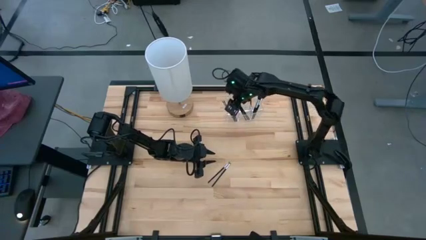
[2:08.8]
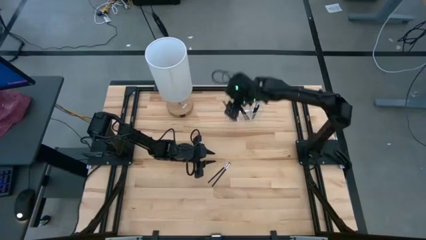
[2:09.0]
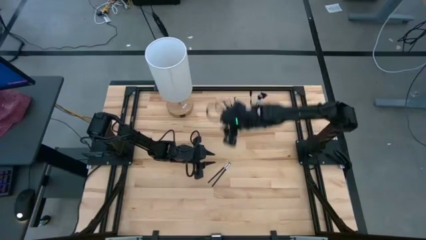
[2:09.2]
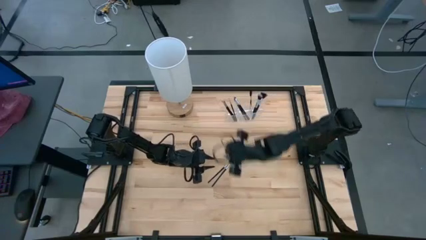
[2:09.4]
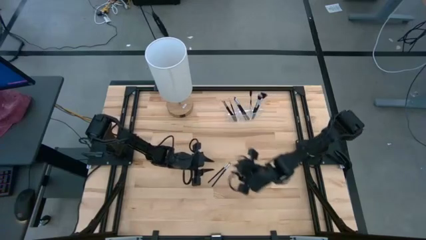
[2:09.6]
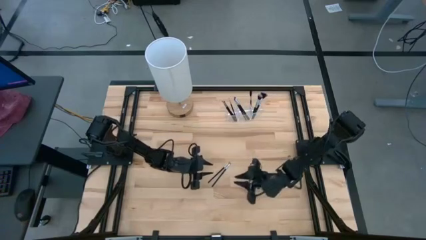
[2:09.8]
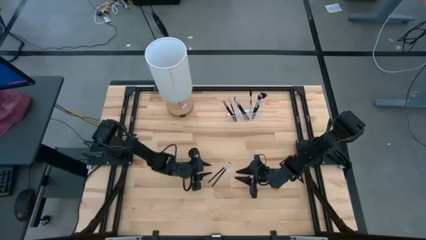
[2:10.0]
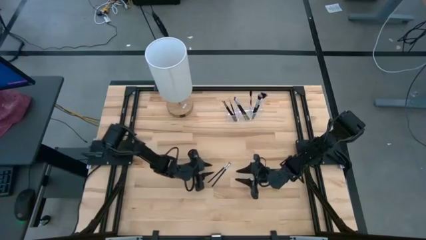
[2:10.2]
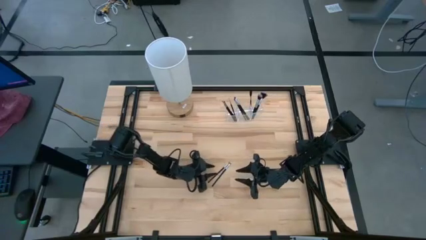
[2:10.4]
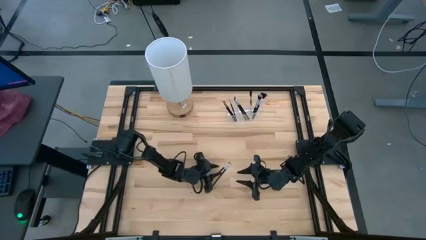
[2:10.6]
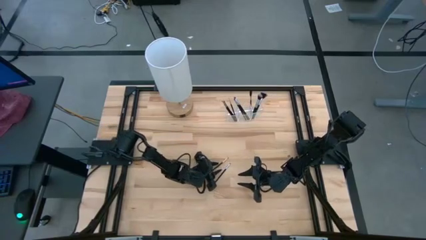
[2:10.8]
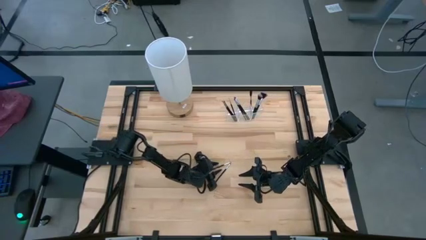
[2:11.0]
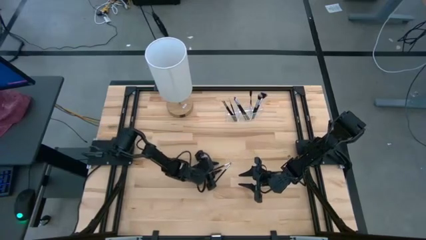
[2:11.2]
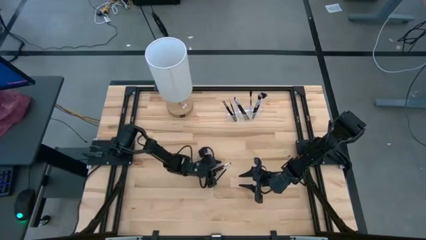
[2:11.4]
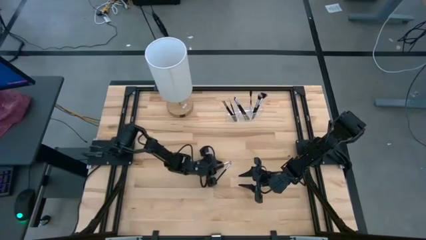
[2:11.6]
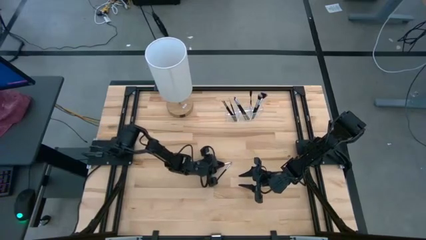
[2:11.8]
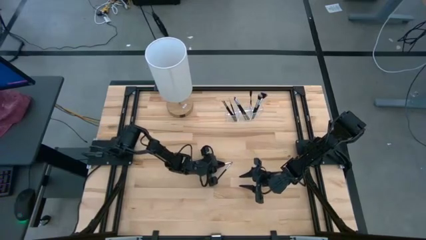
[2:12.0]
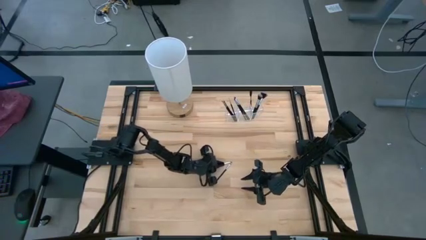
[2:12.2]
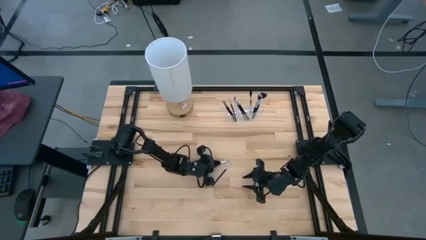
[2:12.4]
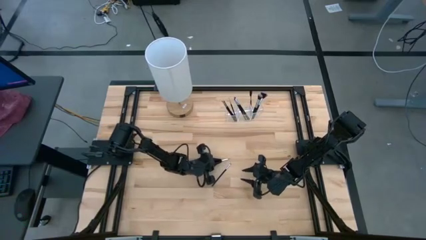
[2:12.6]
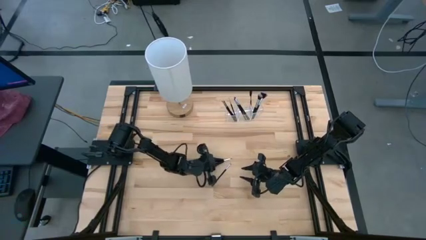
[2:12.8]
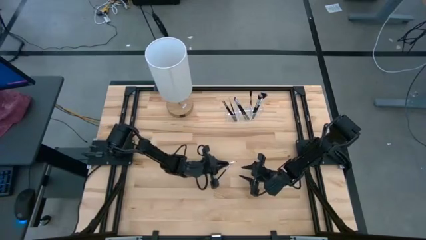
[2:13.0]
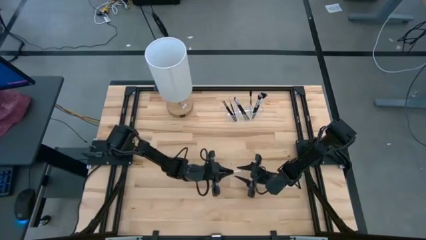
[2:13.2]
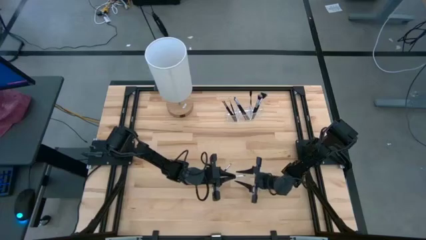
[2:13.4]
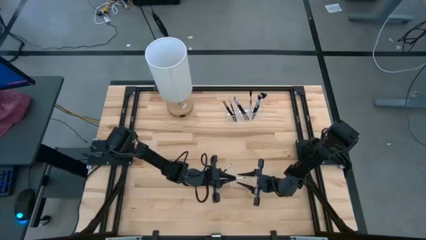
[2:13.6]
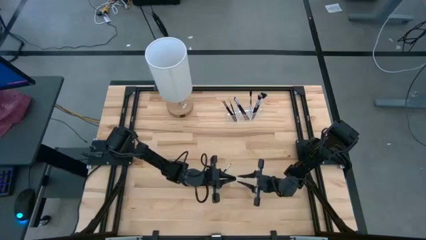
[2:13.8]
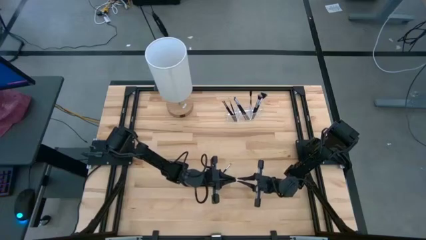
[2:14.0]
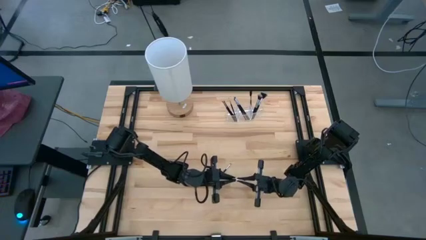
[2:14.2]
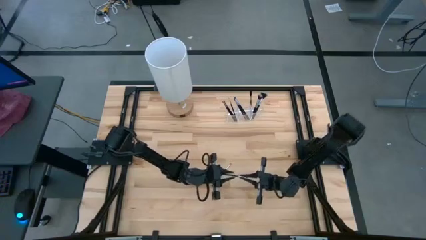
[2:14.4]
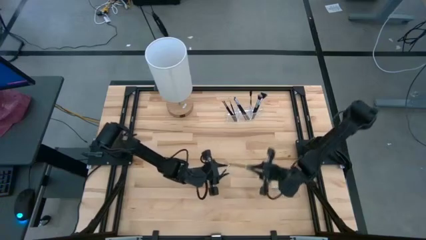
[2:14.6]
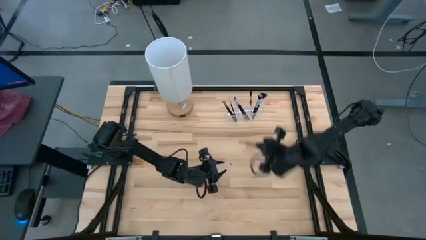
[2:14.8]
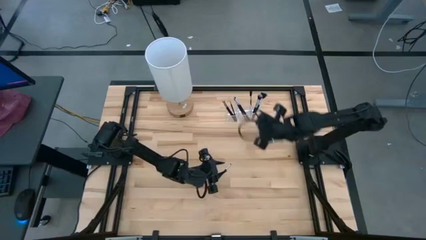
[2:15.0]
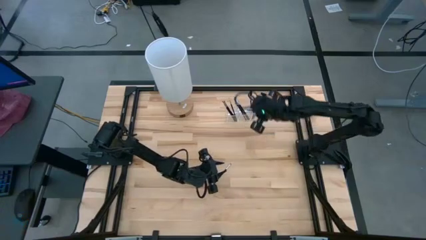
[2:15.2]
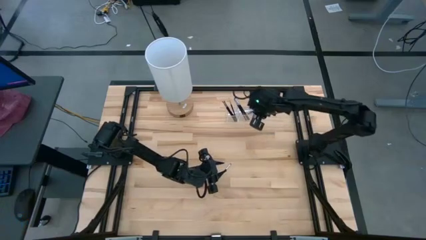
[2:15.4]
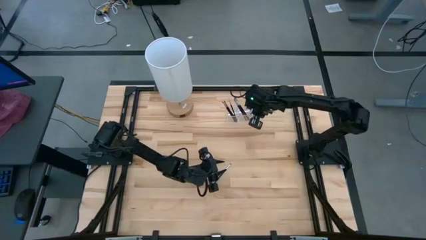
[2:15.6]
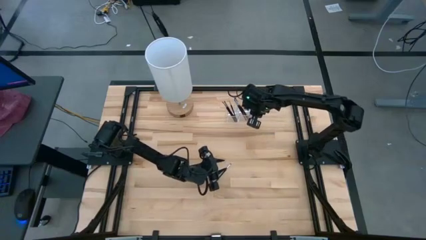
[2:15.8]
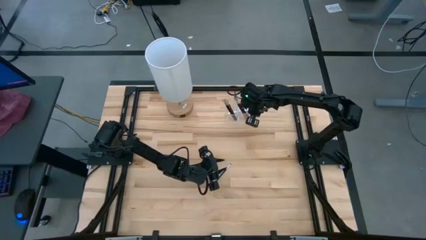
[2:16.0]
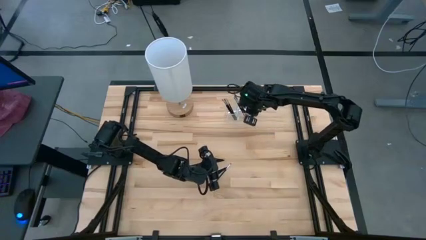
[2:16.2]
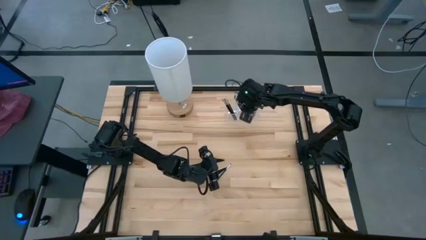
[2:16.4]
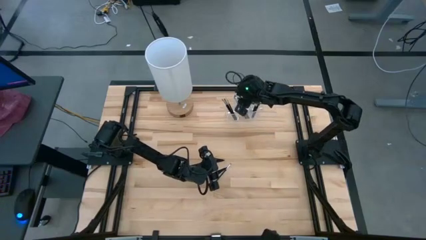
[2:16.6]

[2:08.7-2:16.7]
Task: Sort items
Put the eyeshadow brush into the transparent organizer

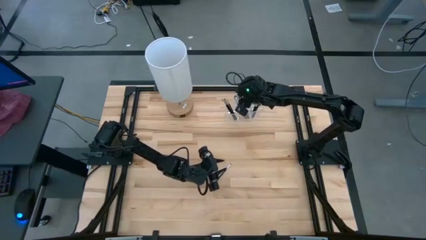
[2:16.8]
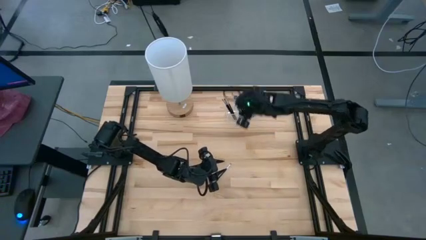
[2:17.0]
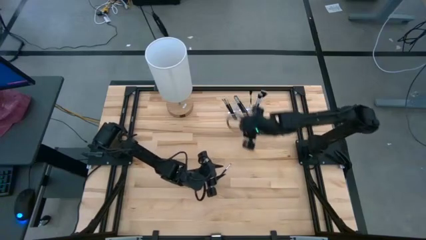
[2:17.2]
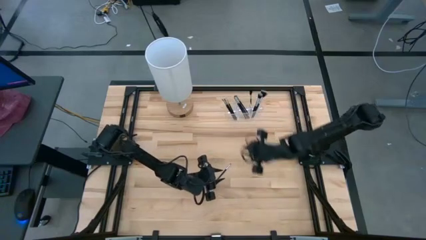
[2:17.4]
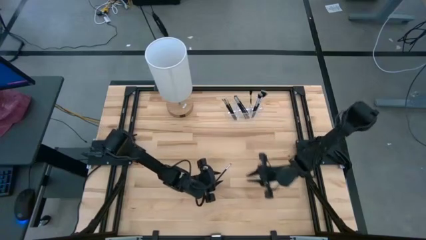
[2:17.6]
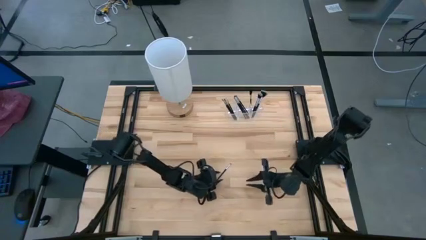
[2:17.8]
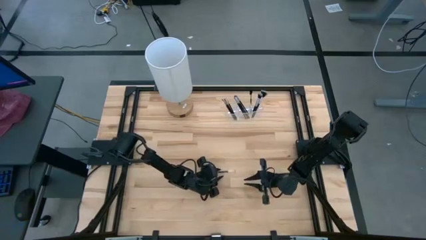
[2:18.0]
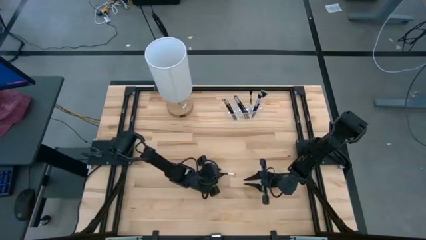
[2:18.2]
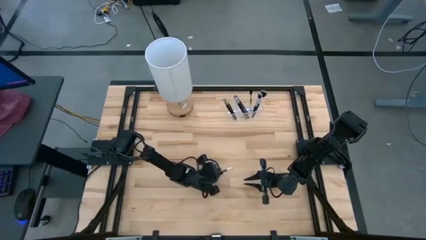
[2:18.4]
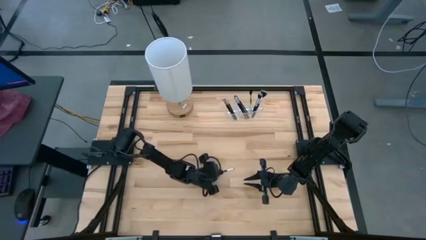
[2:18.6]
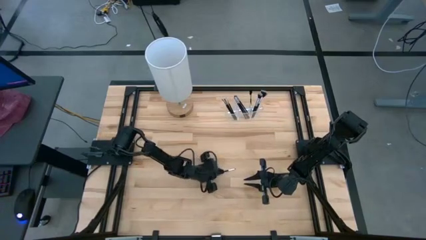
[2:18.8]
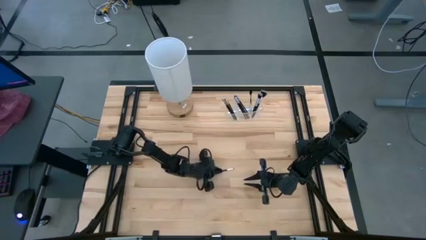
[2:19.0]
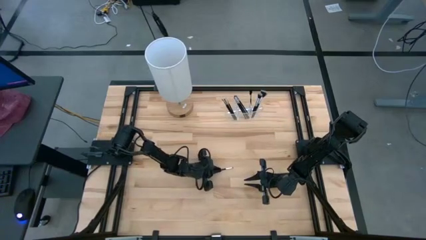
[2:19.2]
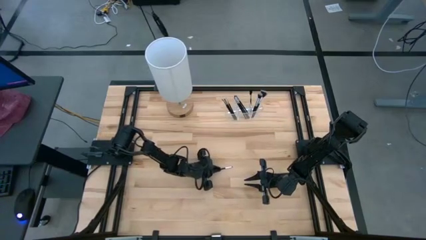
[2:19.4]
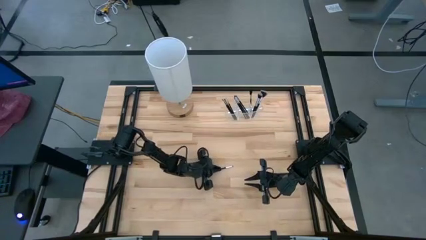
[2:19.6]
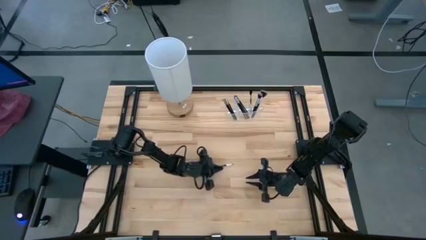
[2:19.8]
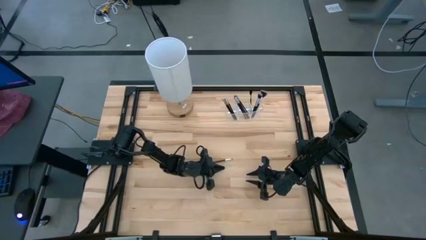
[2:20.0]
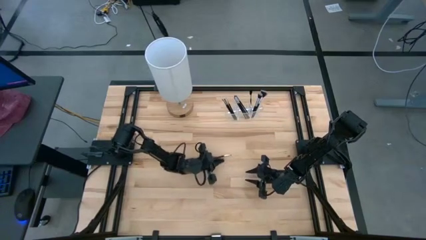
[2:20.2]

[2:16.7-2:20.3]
Put the eyeshadow brush into the transparent organizer

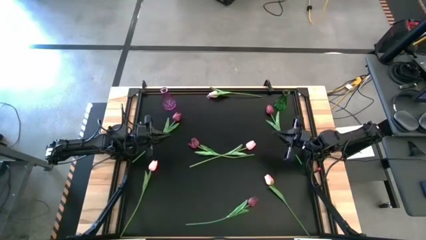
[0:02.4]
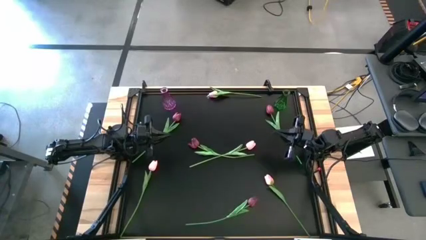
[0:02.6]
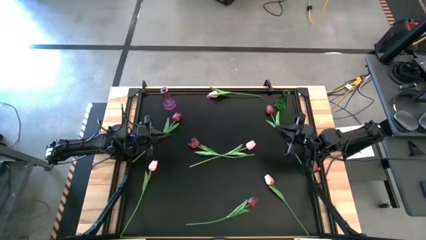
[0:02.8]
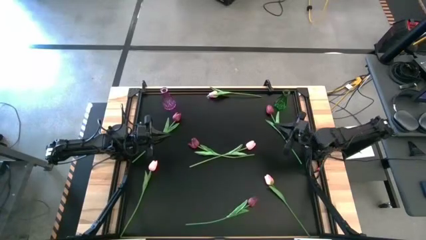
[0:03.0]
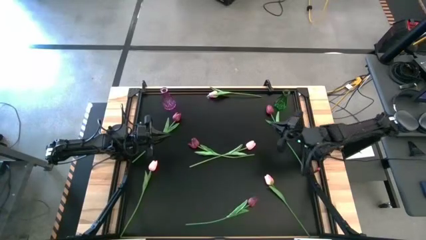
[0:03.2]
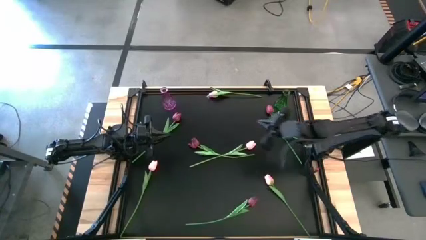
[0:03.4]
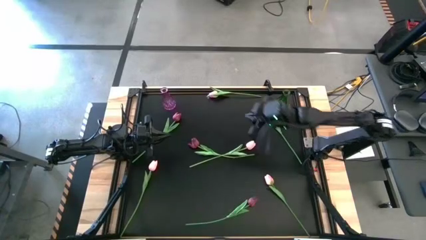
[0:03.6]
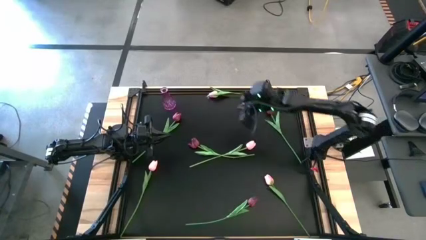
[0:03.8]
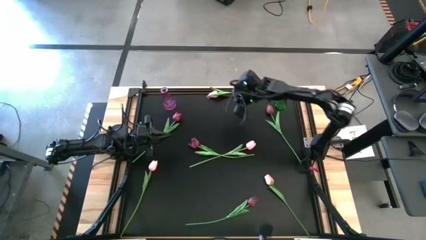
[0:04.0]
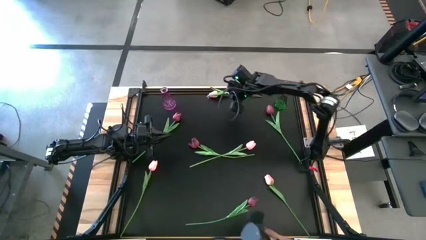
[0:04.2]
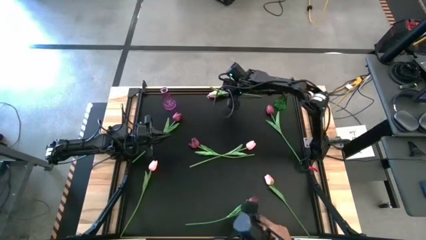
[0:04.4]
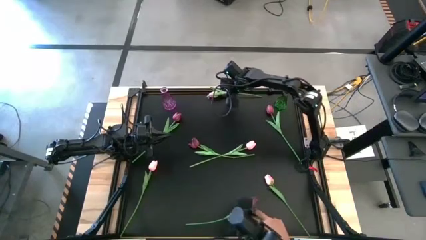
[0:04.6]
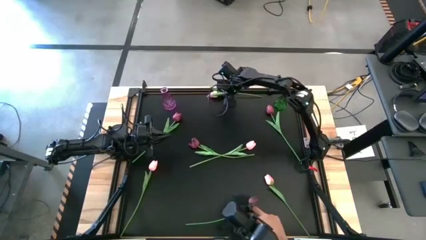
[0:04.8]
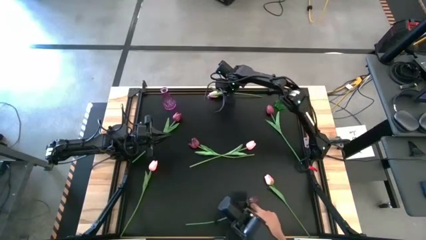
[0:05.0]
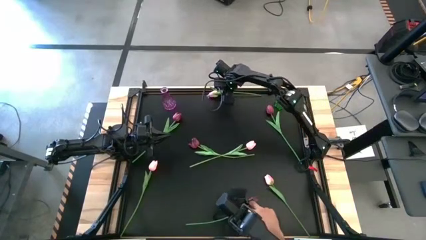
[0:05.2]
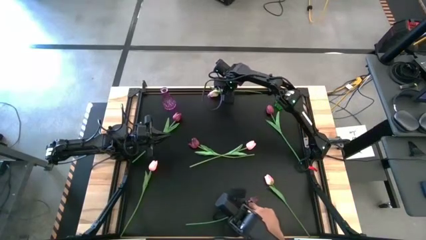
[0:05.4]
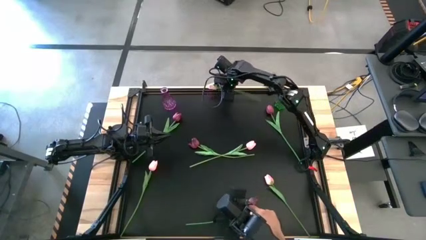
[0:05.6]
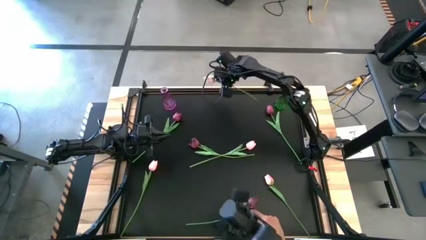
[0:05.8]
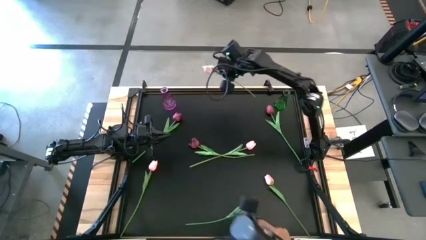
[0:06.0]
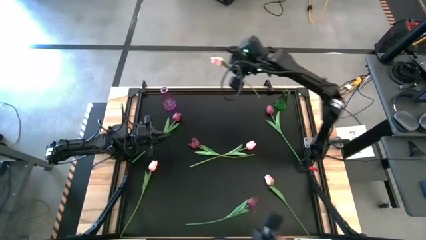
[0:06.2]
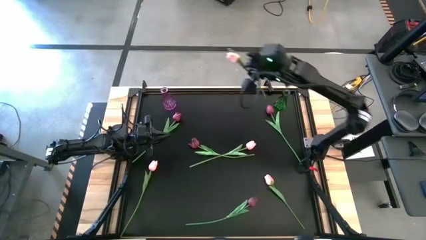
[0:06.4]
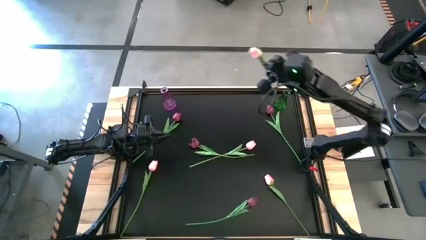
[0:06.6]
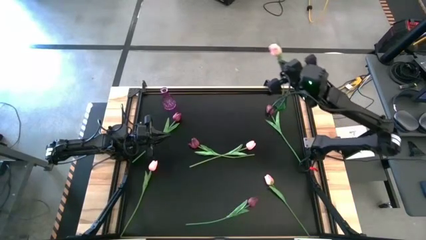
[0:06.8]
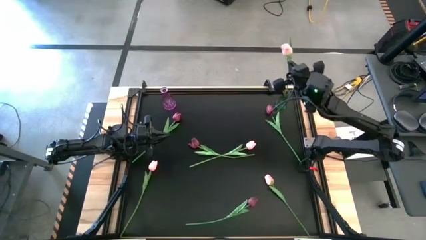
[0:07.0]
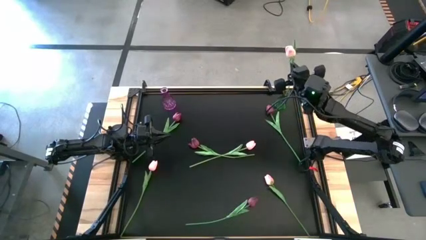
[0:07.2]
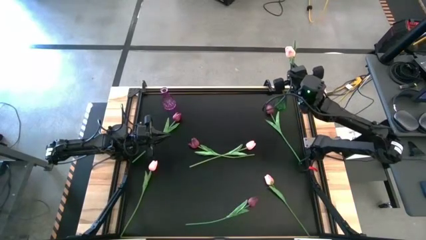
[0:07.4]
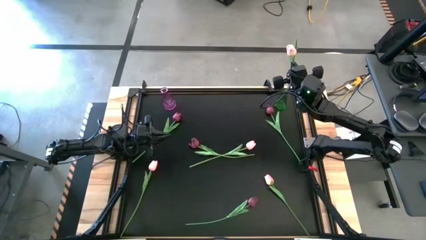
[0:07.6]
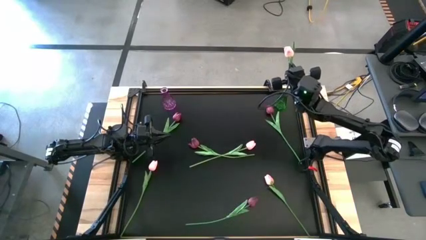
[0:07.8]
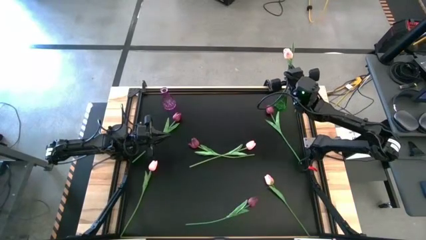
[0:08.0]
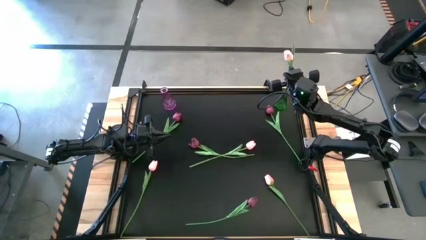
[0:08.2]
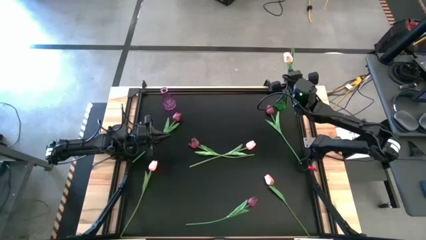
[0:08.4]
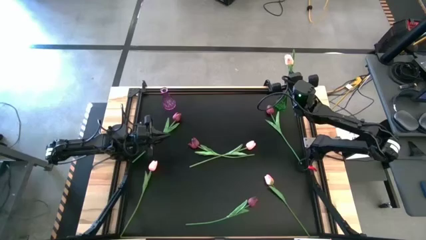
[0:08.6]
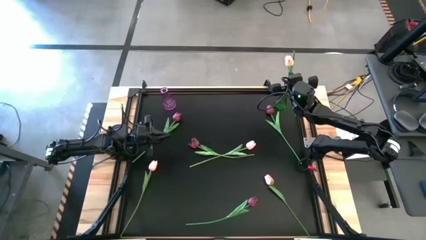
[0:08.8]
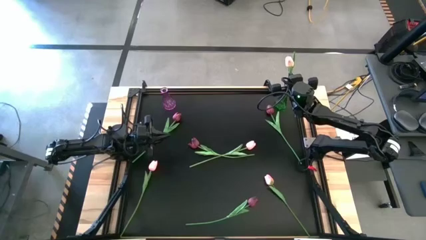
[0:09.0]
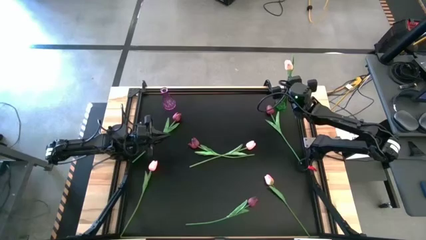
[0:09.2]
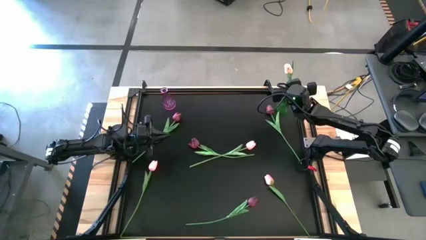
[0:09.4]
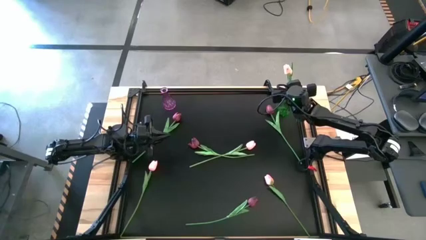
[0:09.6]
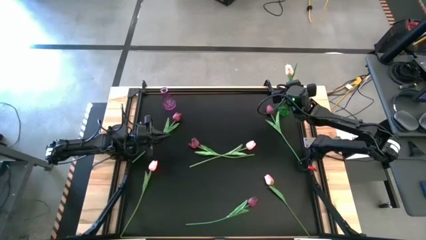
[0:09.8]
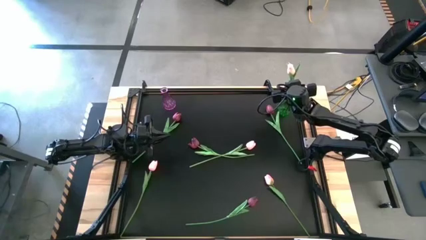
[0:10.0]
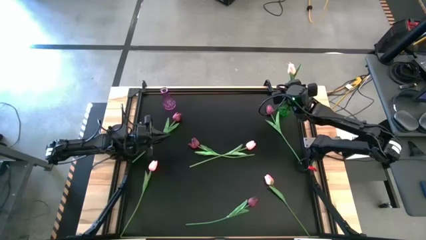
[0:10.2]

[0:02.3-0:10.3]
Task: Sort flowers into vase by color
Put the pink flower into the green vase
